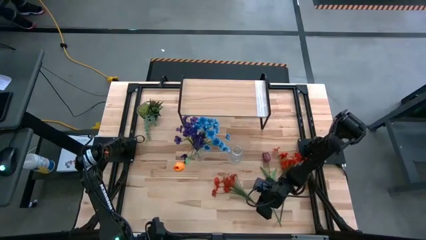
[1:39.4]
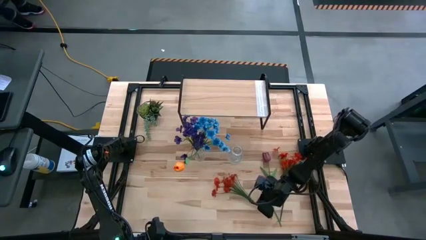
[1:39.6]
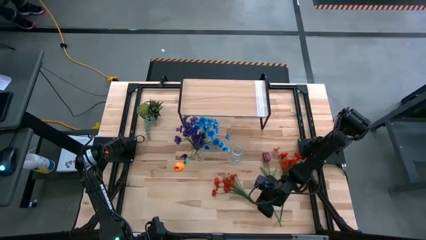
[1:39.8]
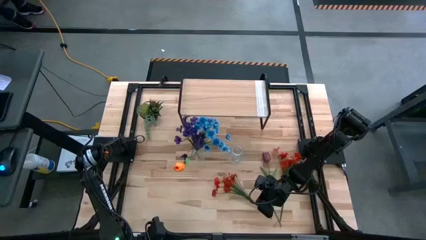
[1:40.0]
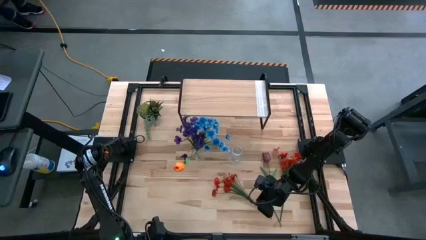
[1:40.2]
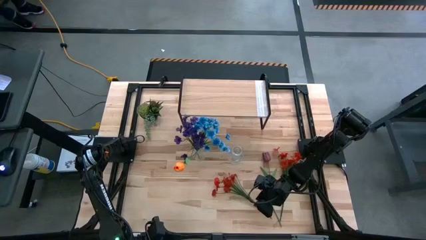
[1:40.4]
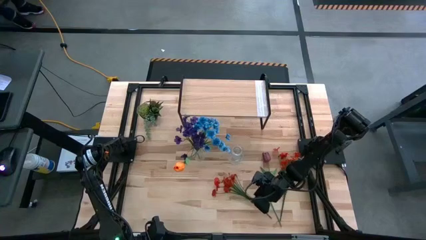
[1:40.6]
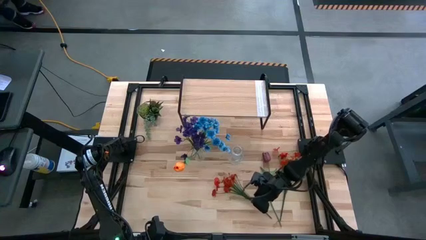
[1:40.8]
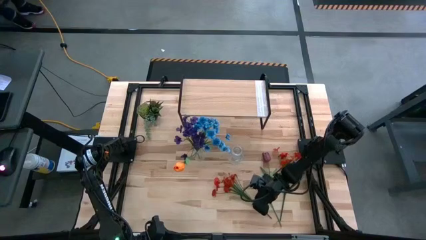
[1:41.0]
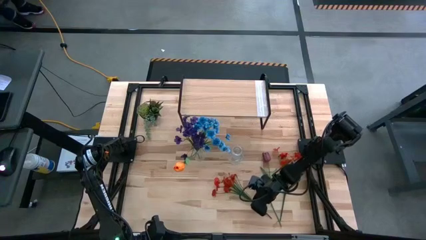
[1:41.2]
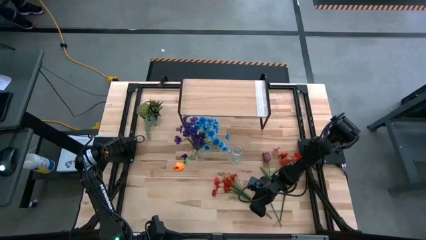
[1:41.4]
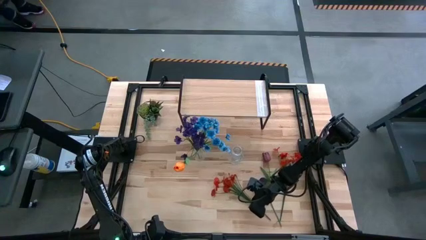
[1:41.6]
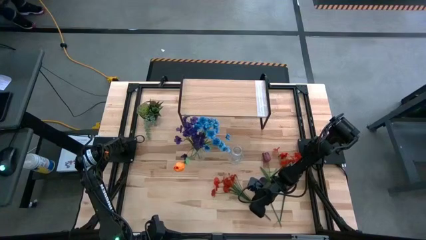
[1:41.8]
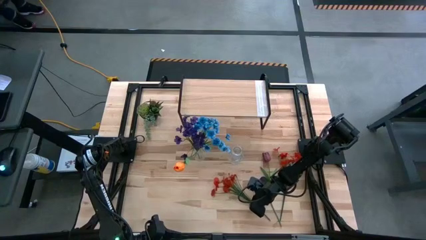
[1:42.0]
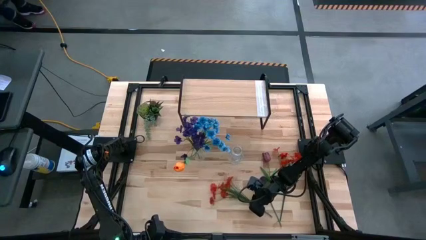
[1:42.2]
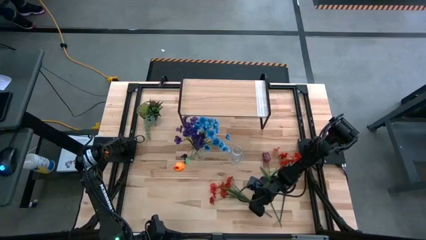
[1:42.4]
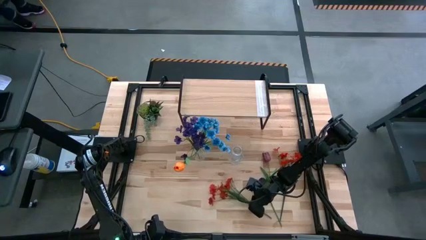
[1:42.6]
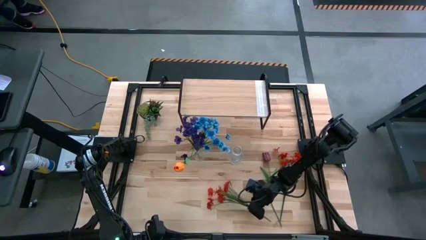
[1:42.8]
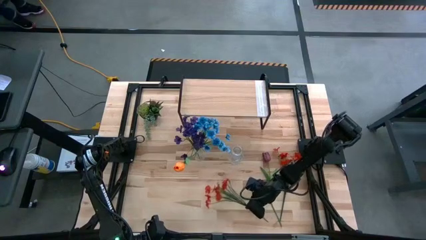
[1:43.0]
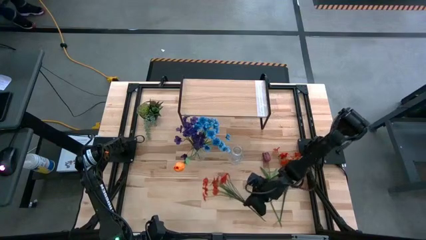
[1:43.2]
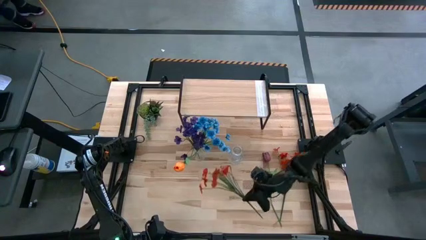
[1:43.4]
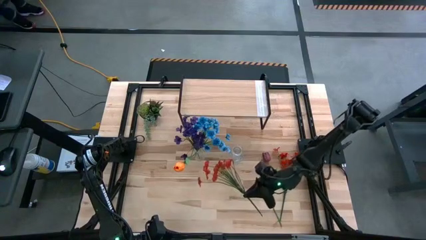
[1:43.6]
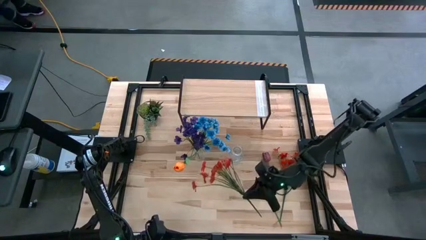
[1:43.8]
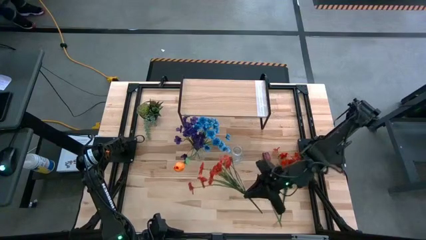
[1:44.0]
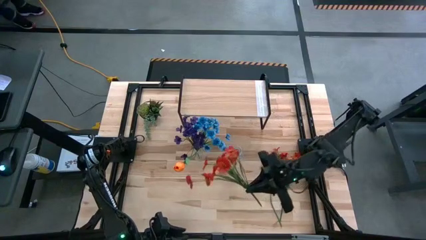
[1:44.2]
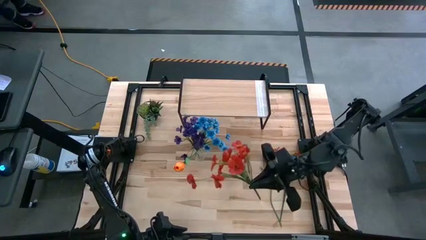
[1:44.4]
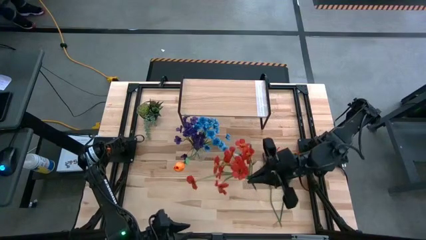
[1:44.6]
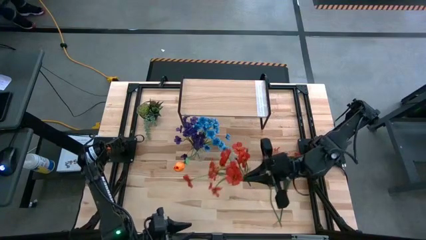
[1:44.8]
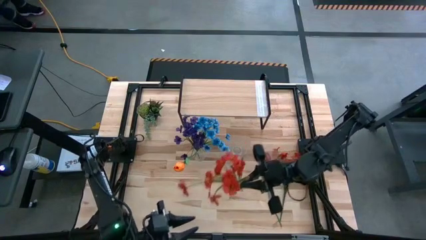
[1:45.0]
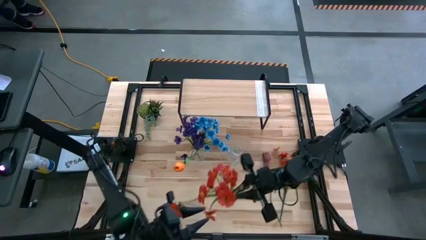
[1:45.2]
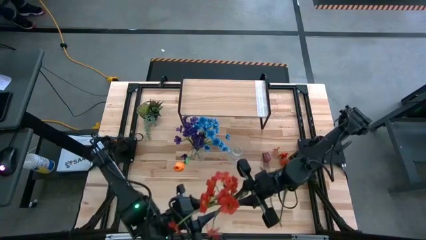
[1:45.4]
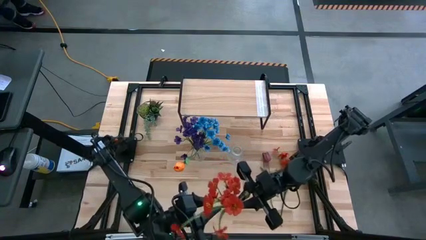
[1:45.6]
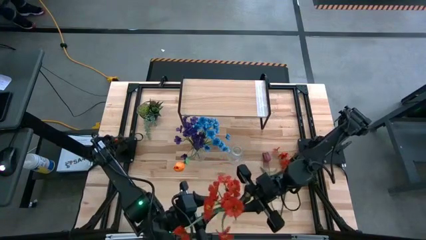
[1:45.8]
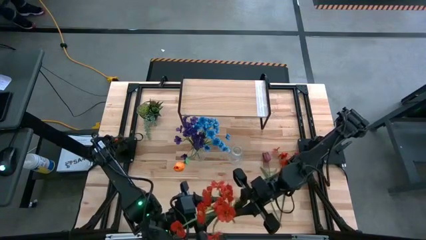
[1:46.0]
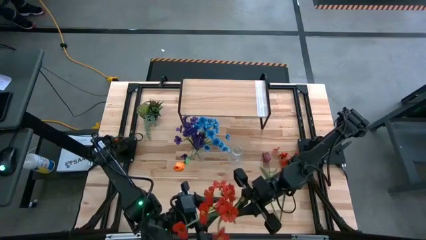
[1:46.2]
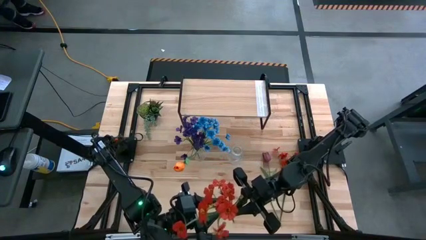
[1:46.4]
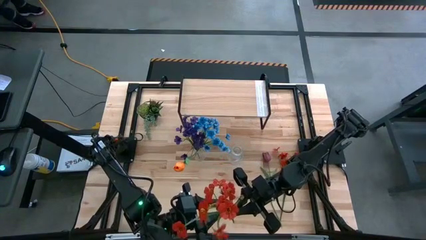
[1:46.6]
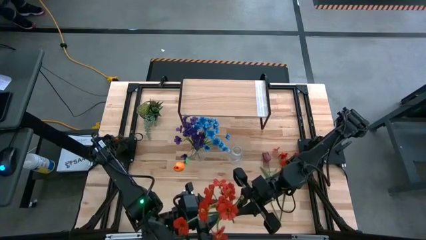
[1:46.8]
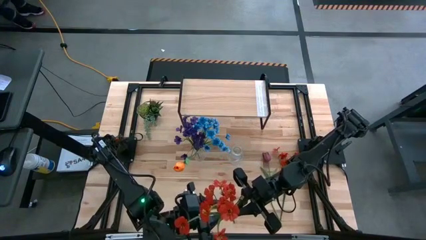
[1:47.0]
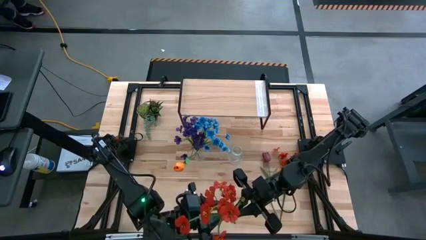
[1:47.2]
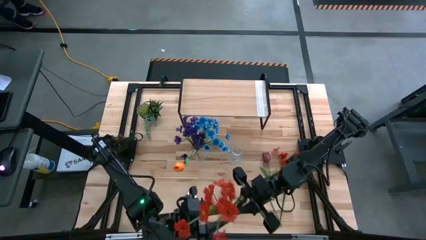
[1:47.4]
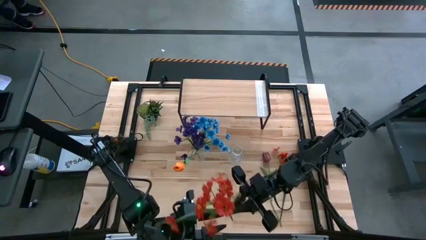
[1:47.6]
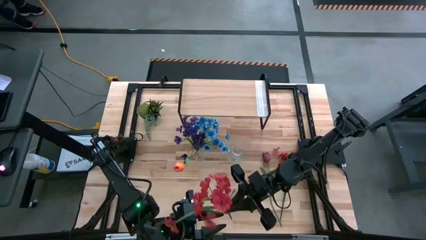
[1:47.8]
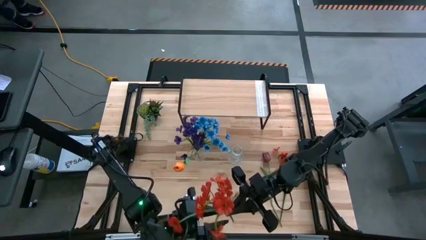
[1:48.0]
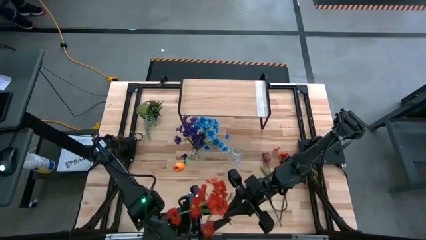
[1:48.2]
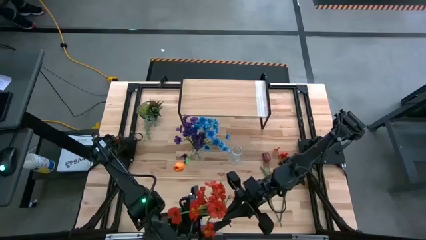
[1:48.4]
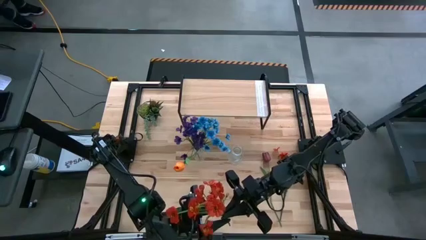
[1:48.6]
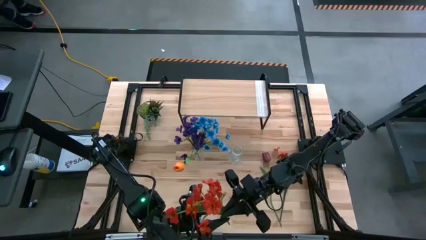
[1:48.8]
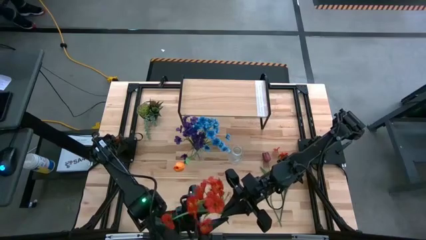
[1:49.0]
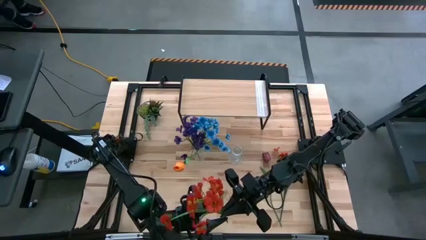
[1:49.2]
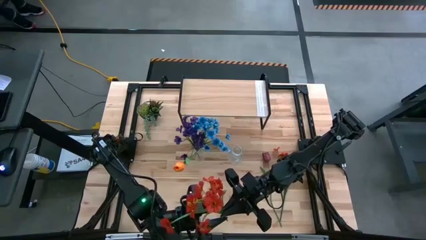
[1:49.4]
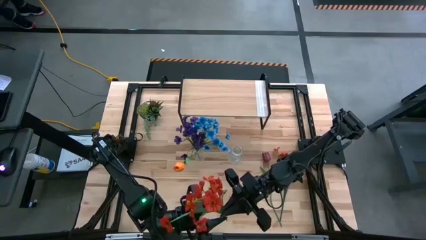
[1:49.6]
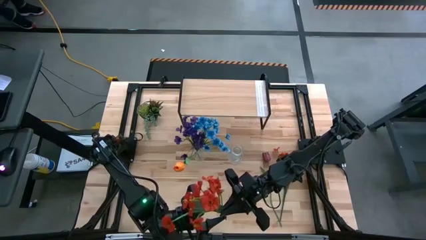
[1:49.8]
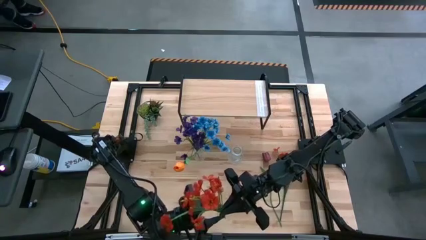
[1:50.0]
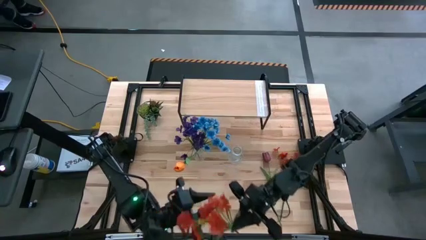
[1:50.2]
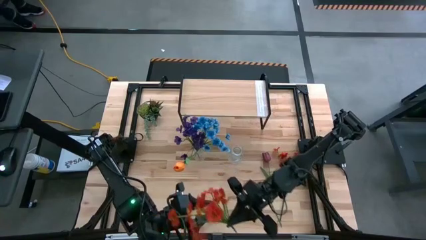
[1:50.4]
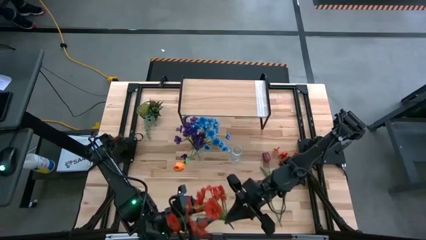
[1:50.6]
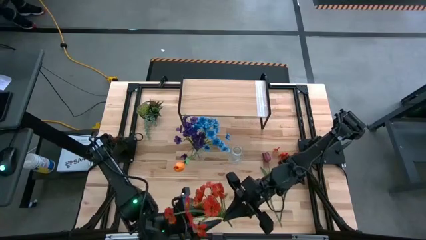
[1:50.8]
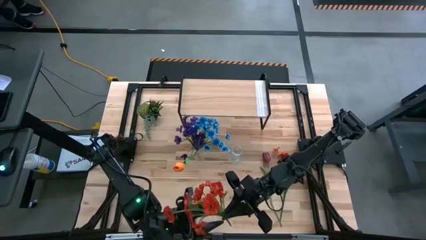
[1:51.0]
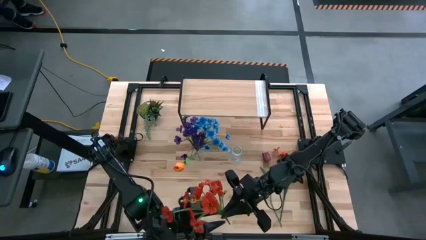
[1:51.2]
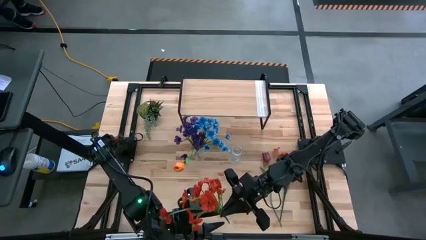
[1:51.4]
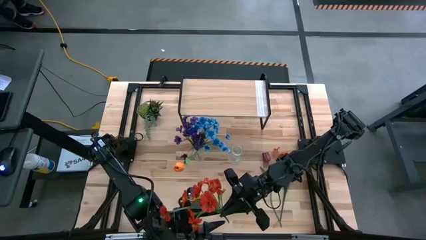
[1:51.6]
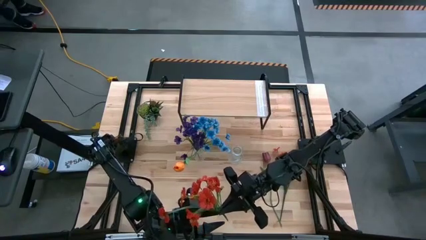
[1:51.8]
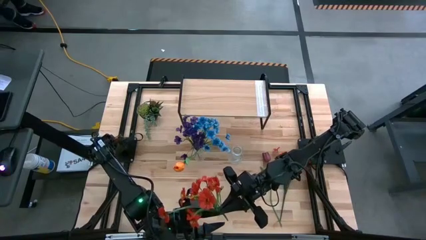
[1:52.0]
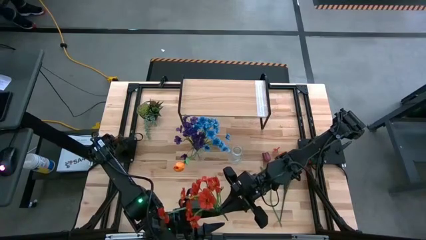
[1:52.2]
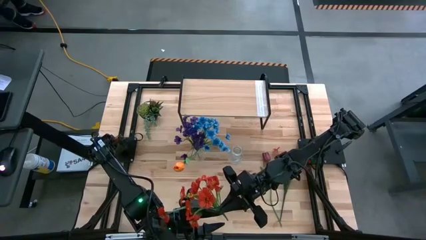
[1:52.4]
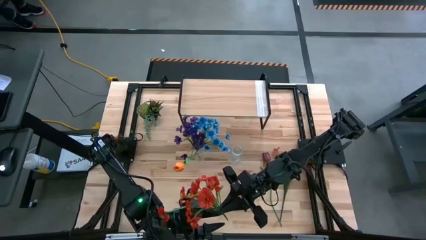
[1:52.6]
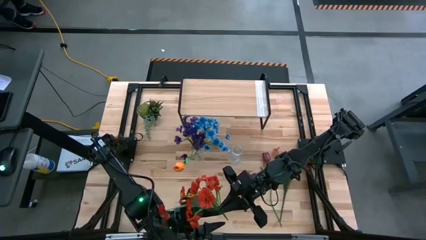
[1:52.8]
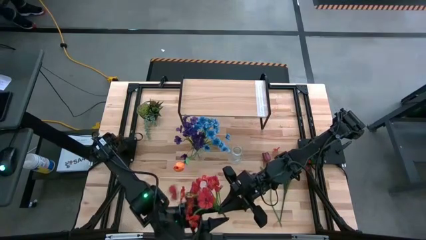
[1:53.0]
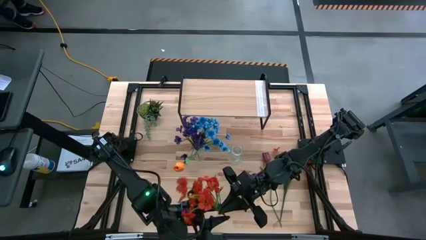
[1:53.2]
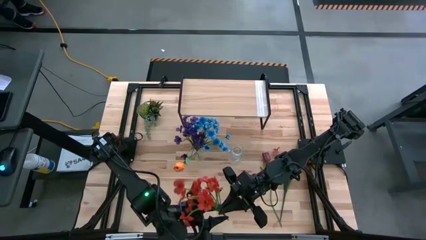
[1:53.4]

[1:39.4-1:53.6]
Task: Pick and place flowers into a vace then onto a shelf
Put the left red flower into the right transparent crystal vase
